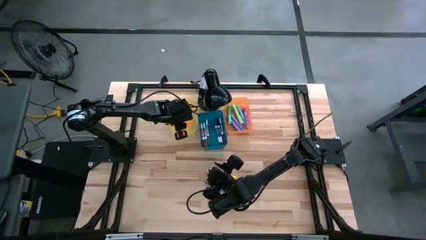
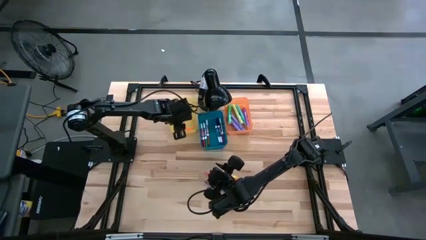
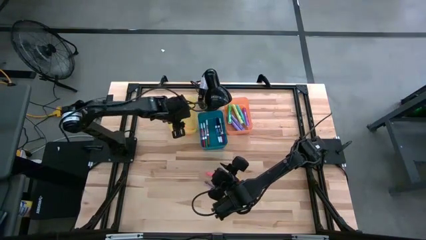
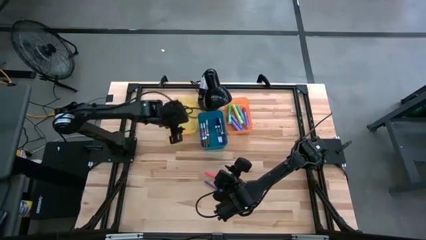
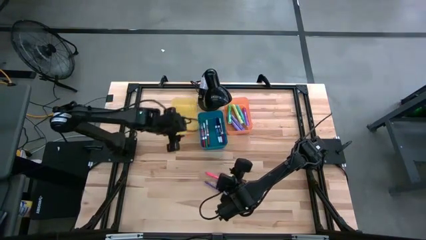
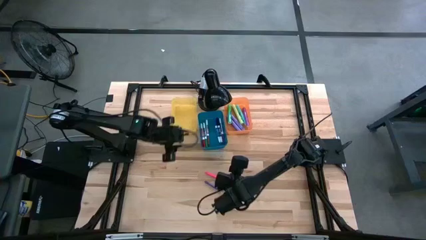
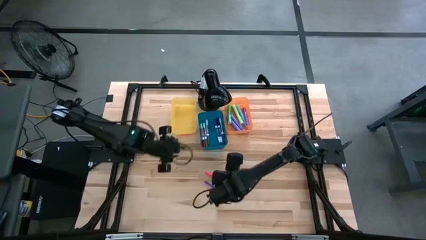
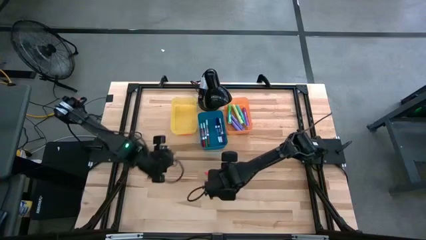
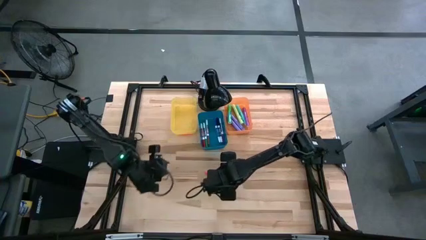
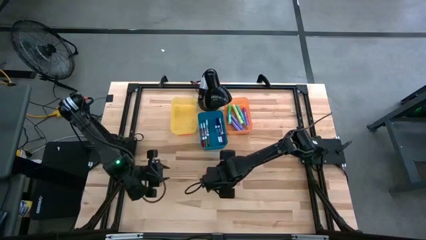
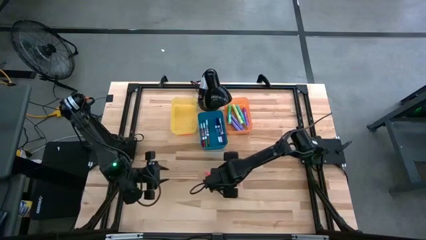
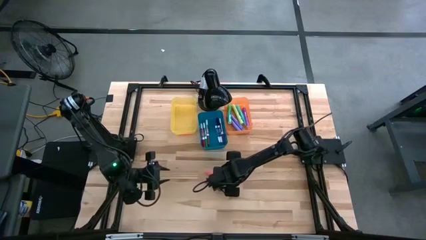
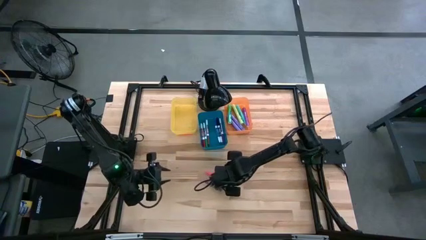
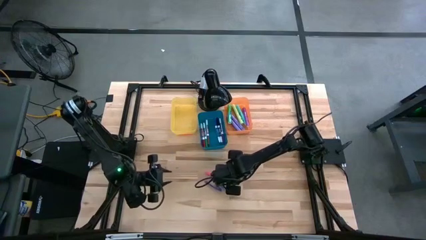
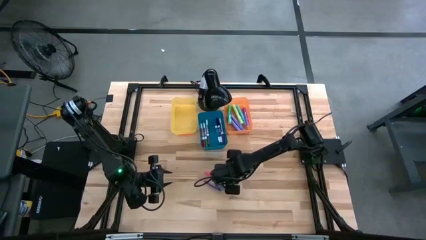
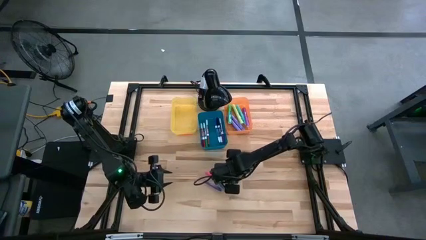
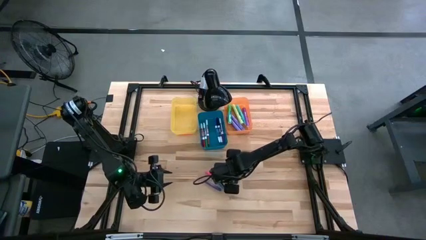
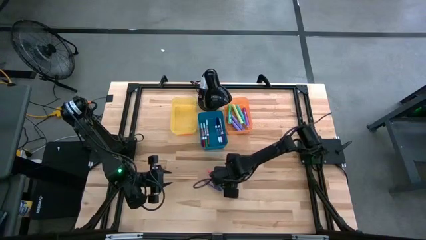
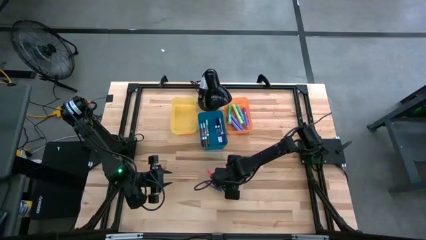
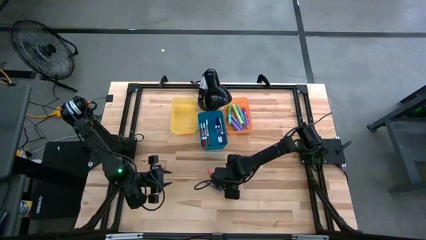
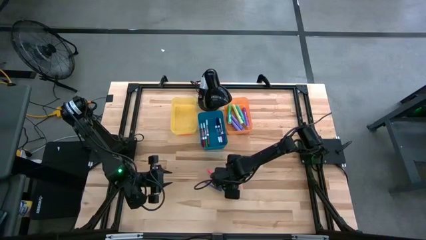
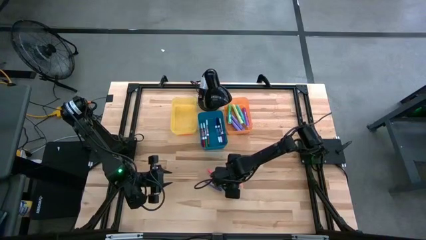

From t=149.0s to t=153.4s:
Task: Pick & Place Markers
Put the yellow mini marker into the yellow bin

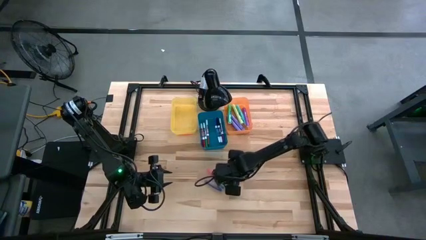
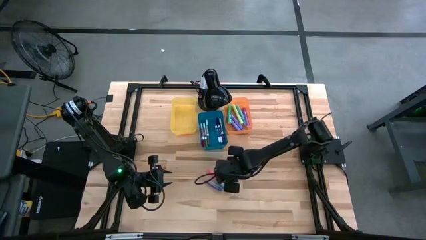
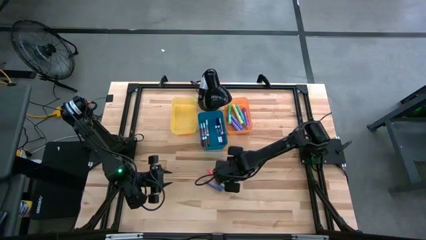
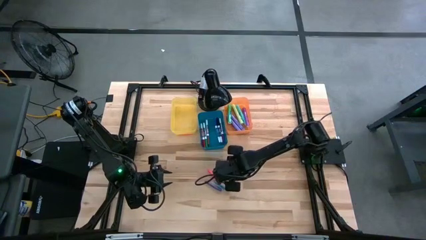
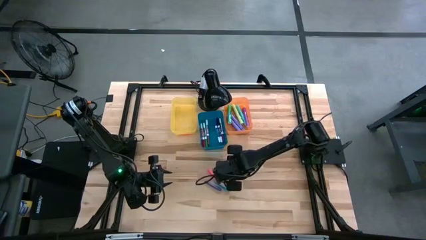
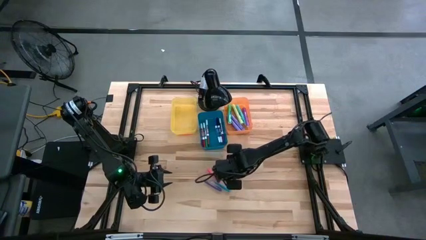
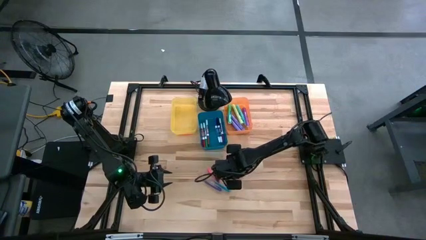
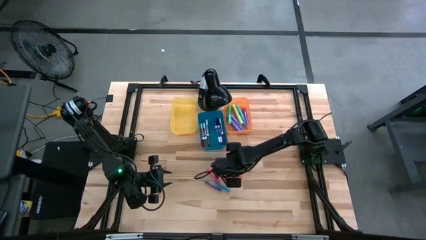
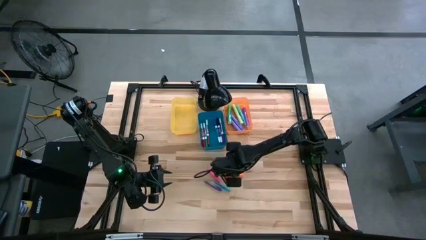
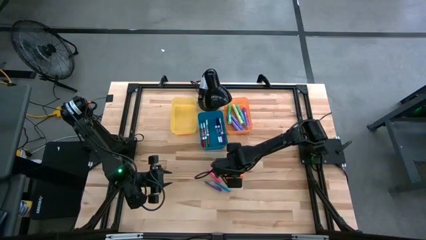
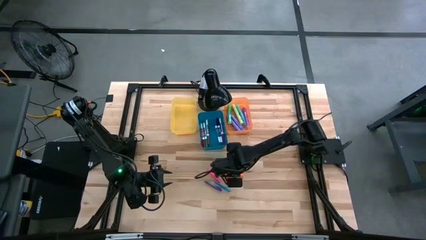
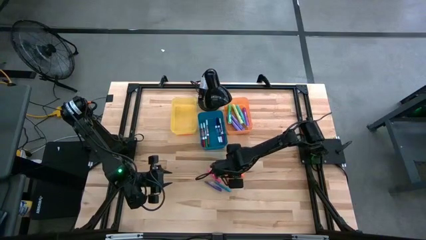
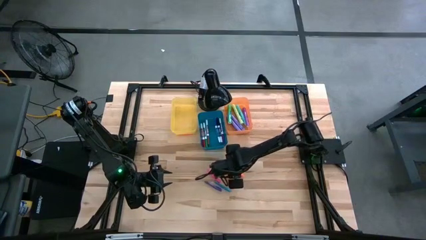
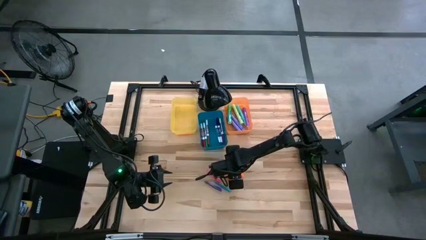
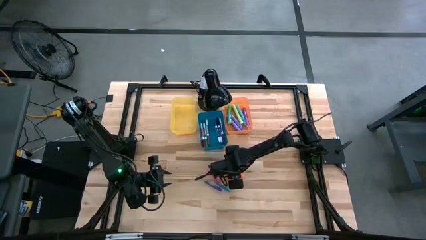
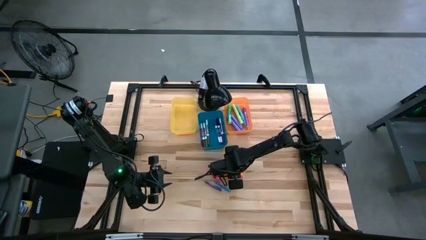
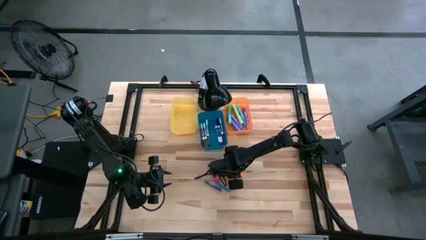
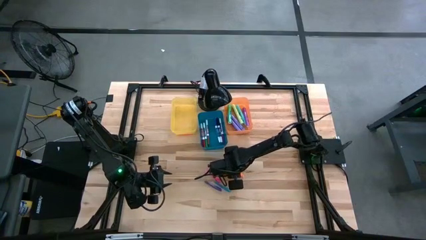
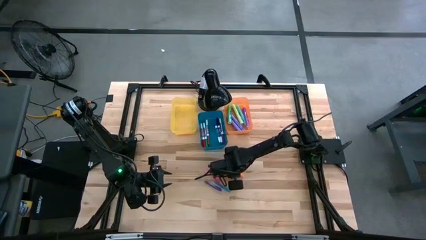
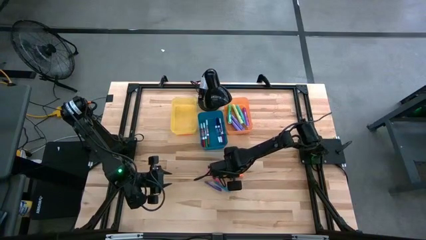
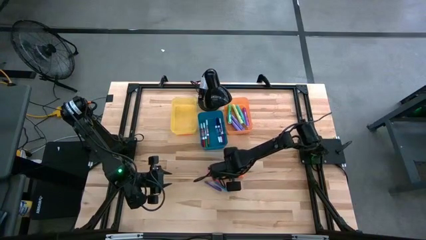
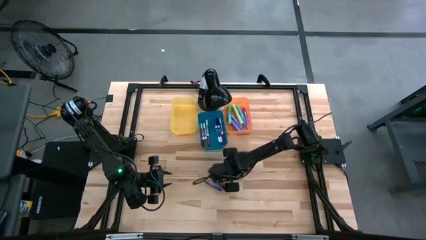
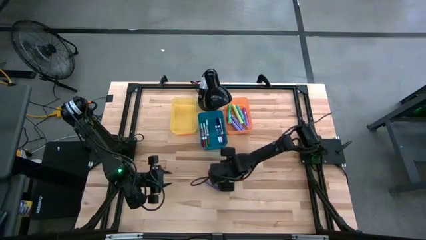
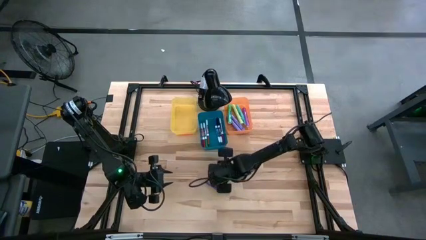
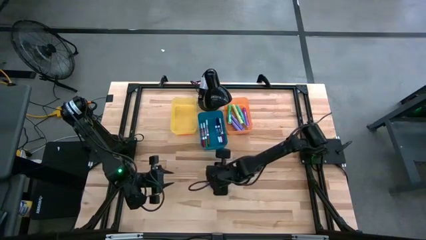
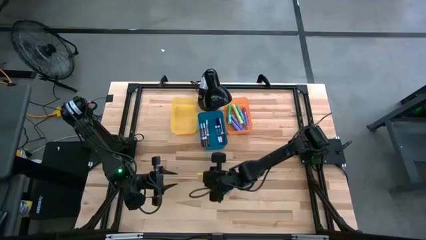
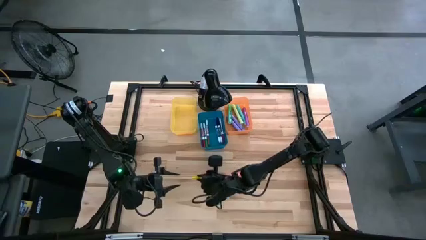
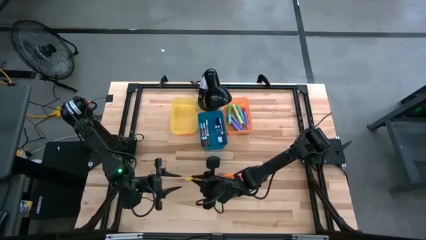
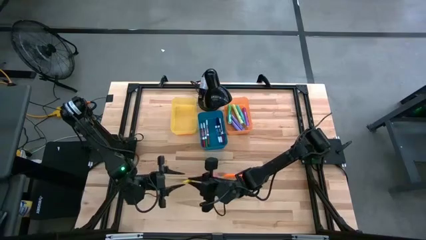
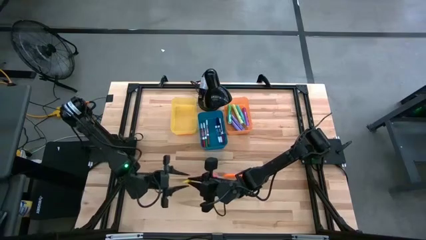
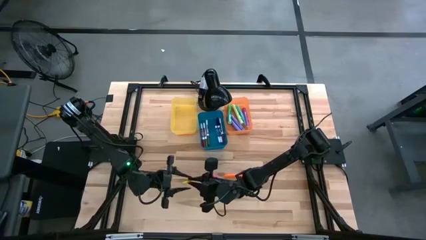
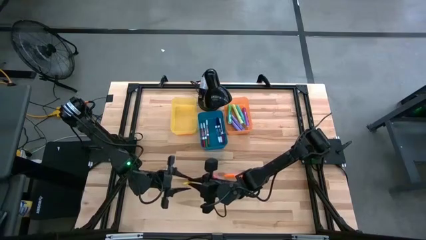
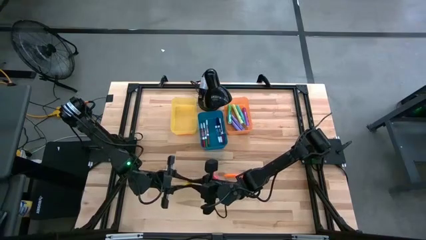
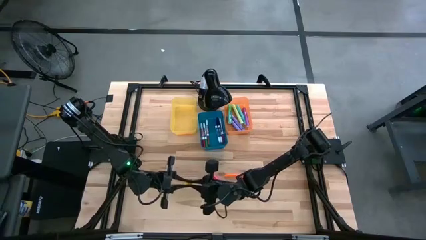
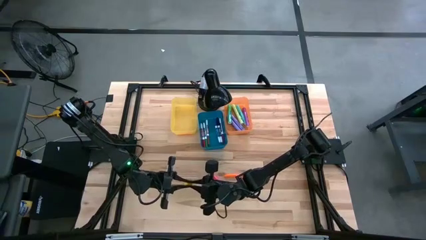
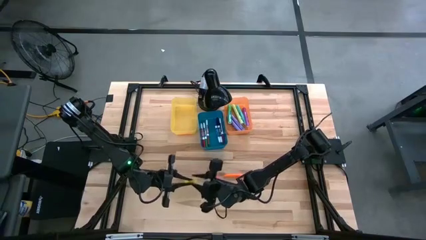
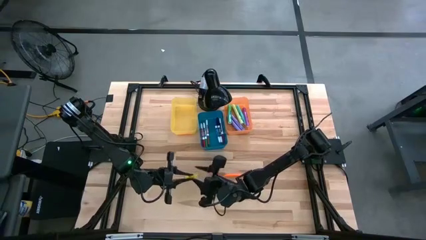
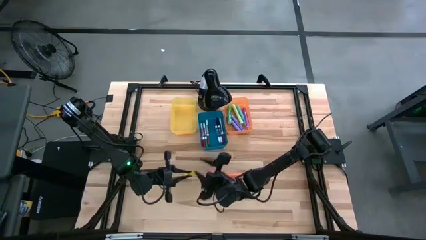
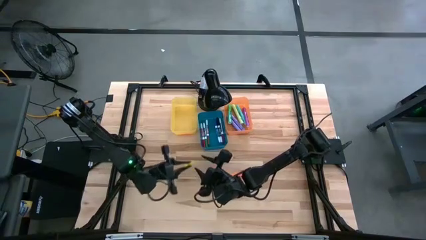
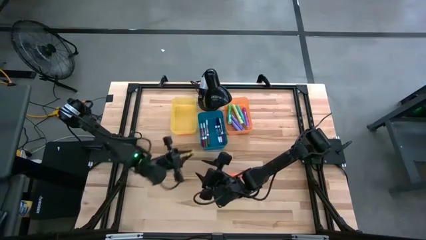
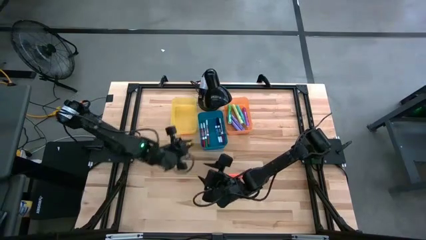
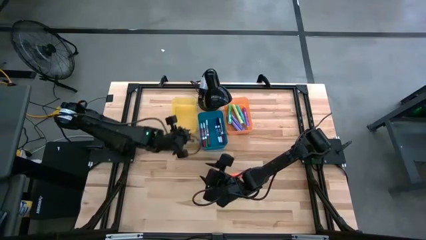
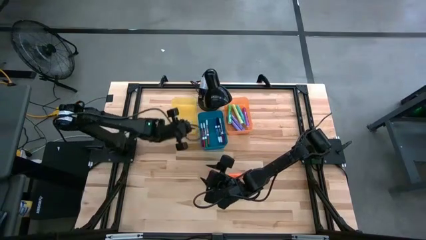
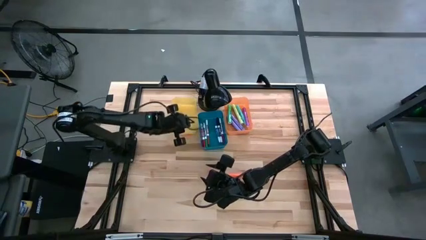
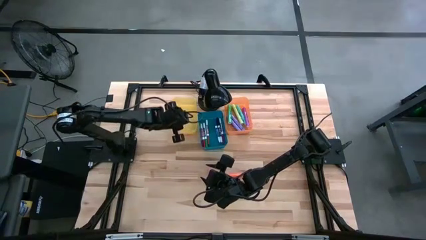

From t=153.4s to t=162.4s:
Put the yellow mini marker into the yellow bin

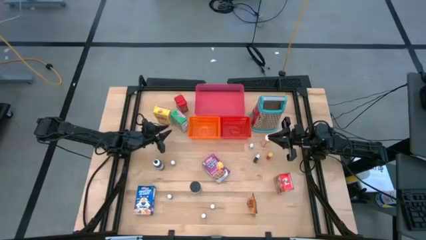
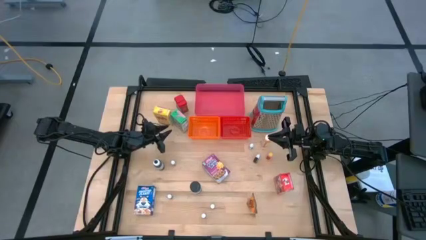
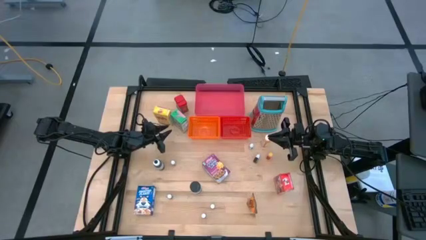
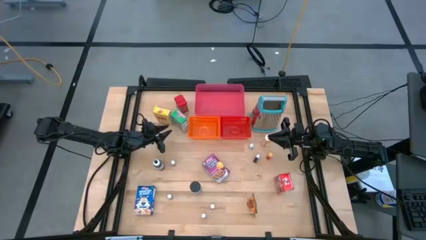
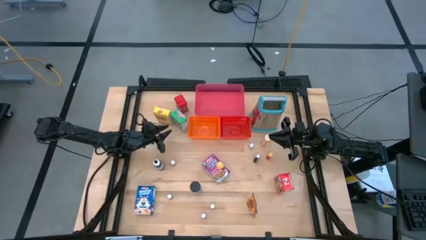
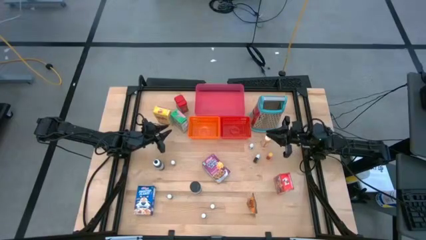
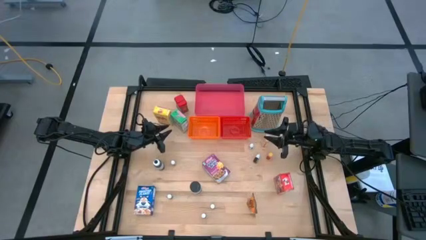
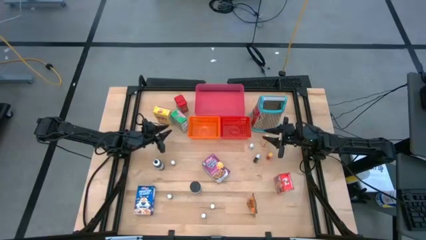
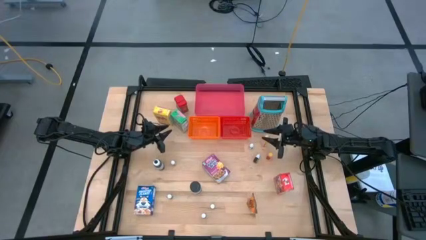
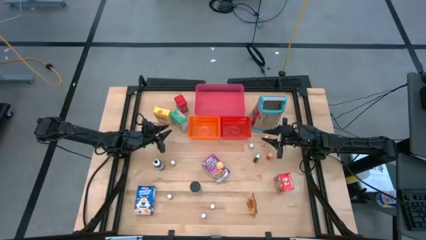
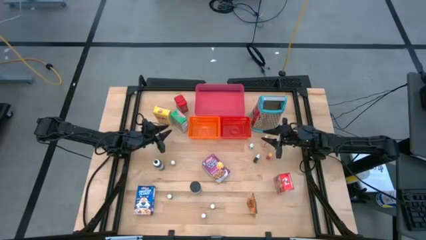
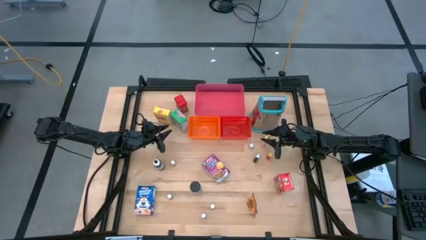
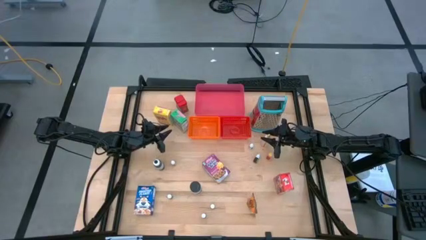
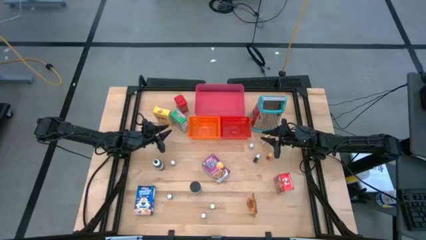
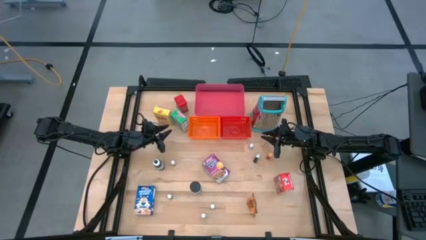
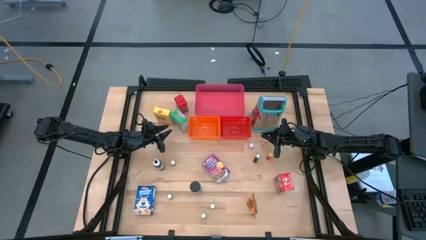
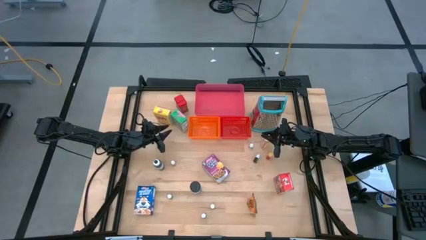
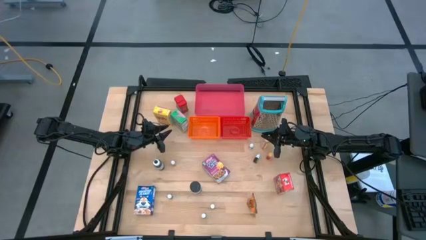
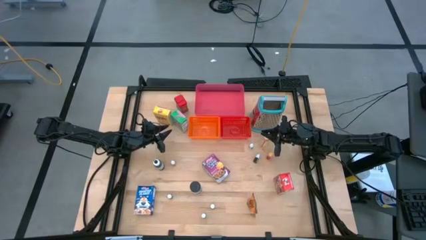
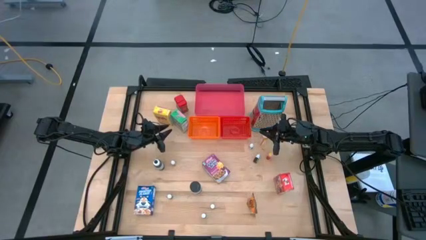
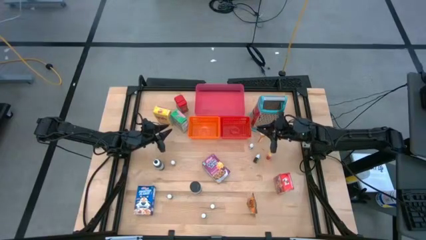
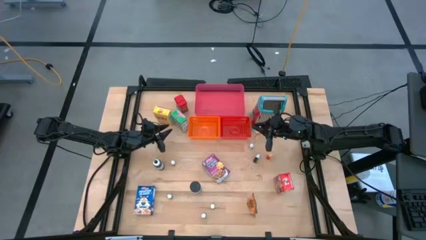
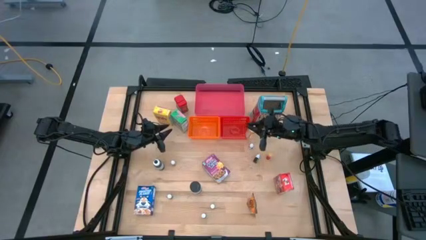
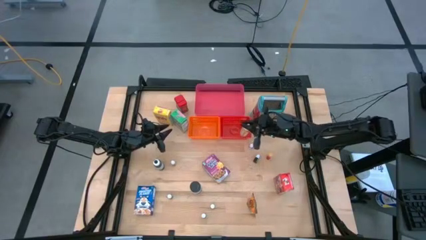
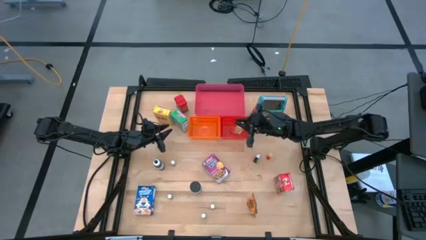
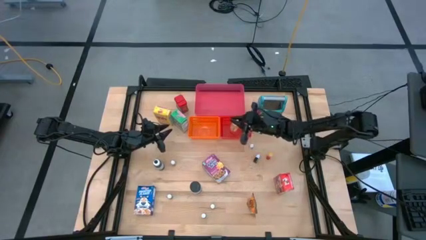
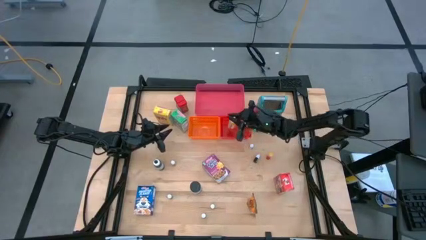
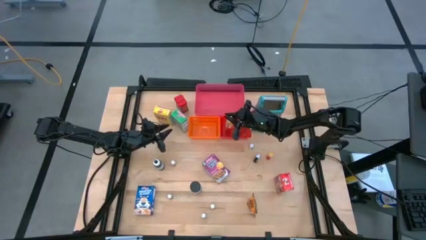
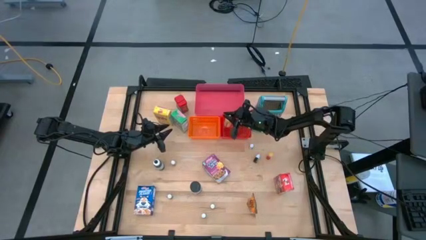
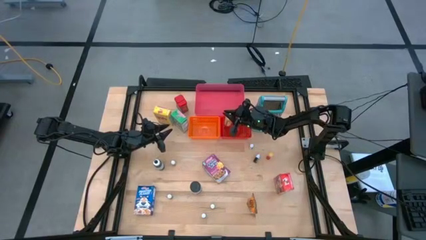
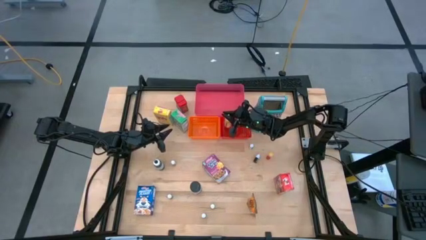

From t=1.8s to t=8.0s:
Task: Pick & Place Kitchen Items
Put the yellow food coloring bottle into the red bin
